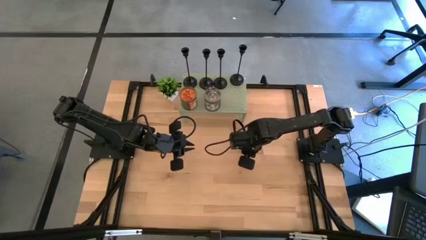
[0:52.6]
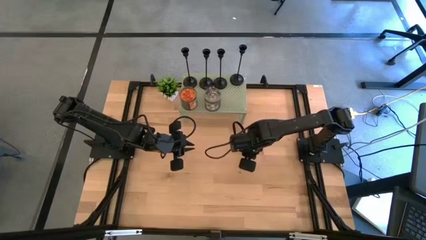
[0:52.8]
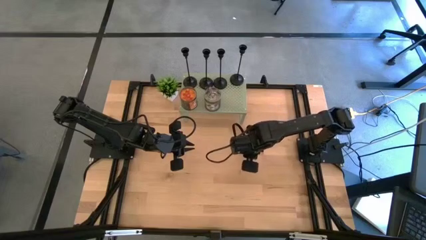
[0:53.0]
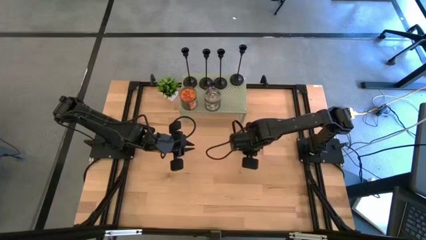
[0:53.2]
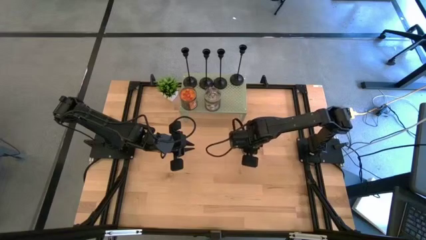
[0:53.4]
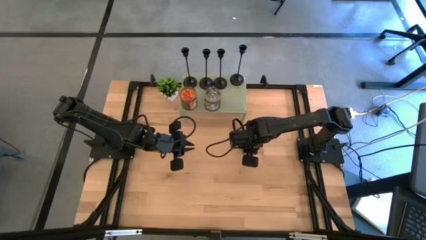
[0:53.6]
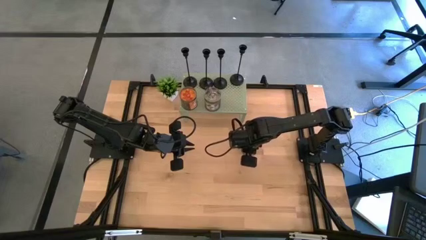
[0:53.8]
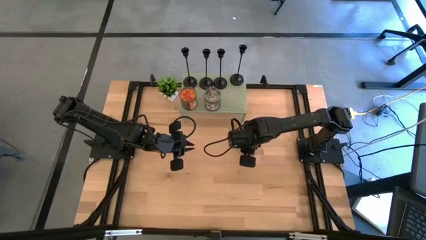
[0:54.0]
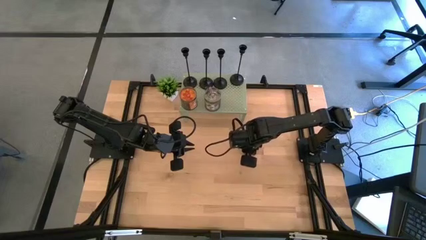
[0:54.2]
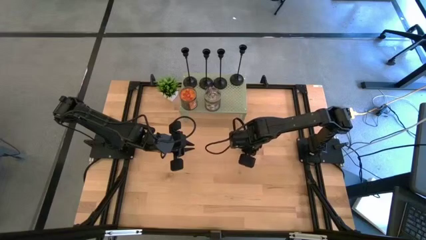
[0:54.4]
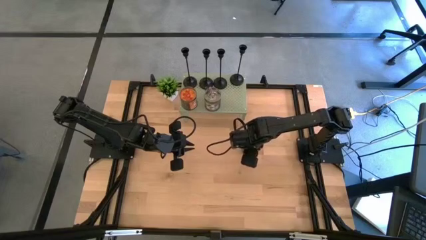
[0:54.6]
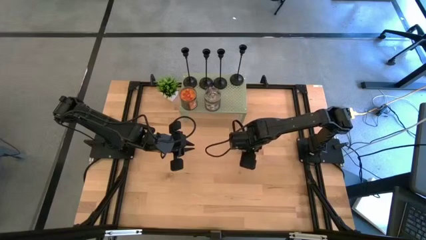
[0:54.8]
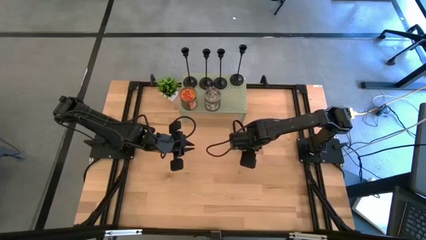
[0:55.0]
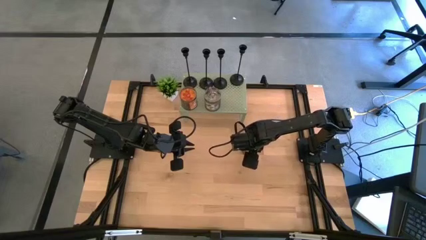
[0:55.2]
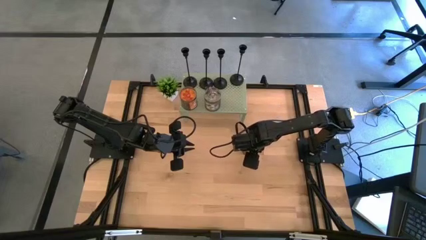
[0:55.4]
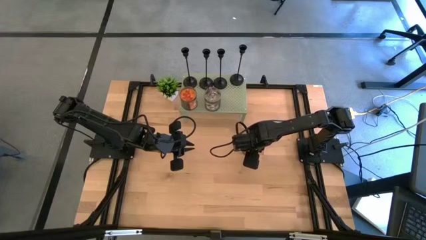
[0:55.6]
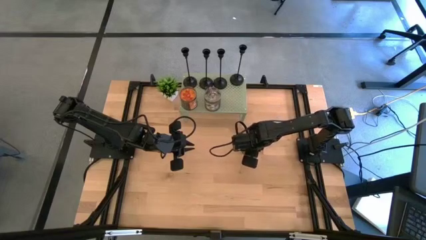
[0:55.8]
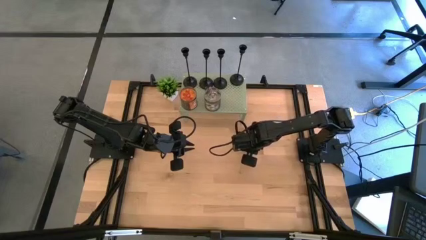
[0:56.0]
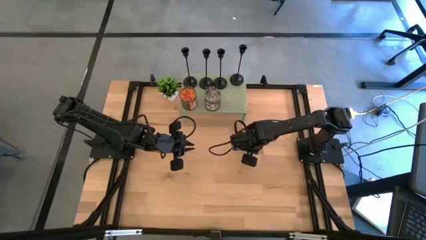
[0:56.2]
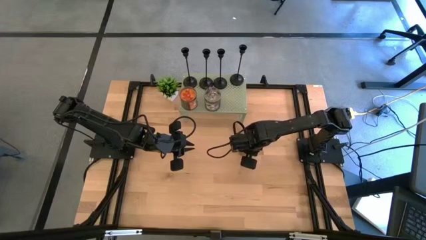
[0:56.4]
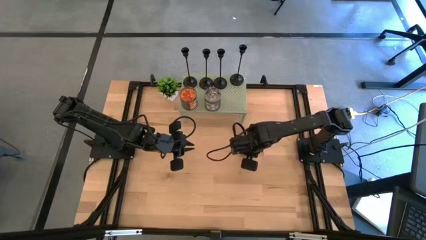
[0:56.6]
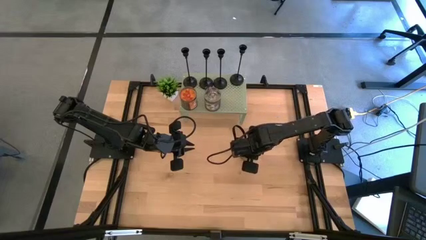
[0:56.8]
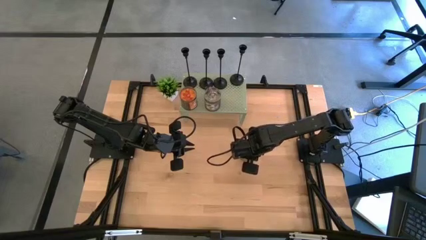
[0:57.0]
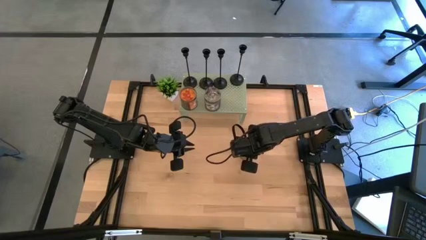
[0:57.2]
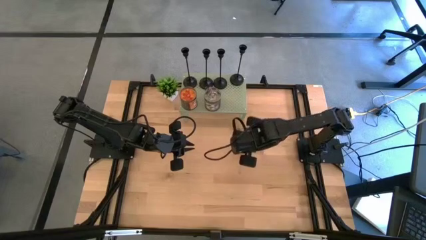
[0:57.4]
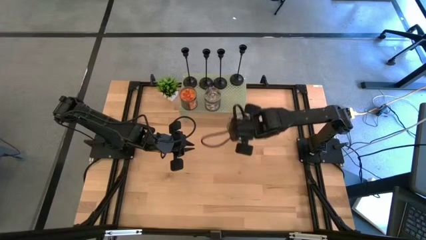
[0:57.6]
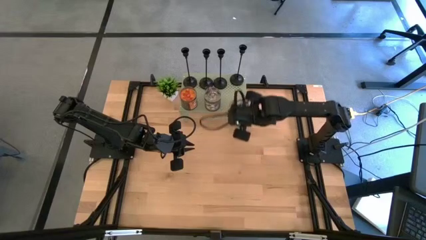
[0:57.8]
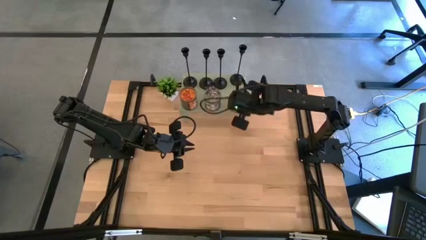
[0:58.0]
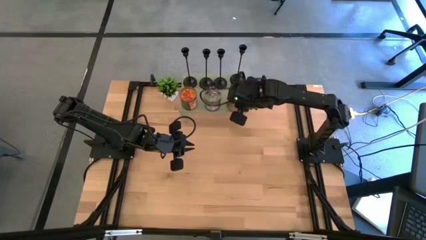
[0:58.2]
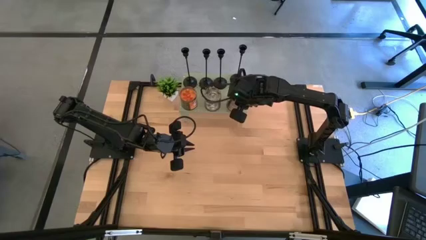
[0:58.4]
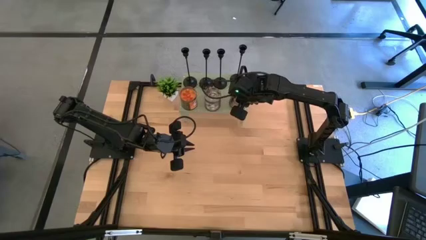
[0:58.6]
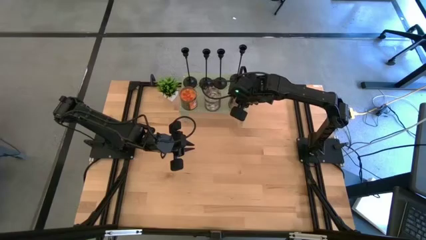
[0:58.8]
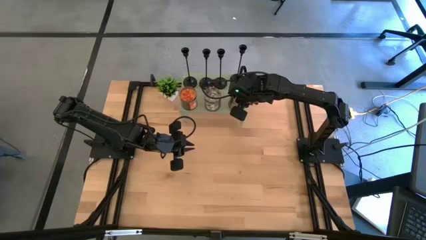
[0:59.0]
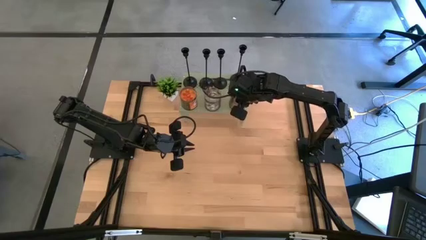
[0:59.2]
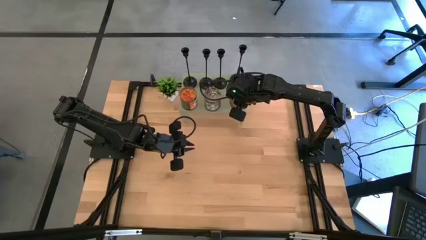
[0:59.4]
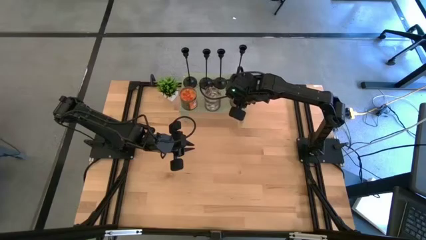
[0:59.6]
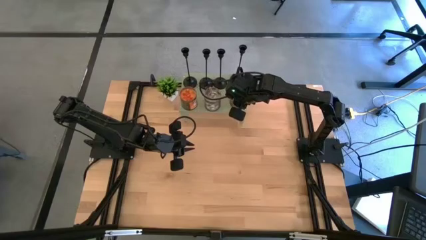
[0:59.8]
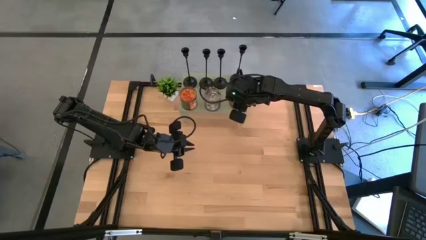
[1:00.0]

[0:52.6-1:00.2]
Task: Pick & Place candle stick holders
Put the brown scented candle on the shelf aligned with the other brown scented candle

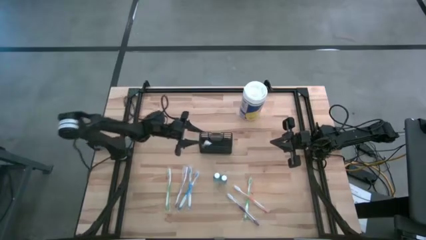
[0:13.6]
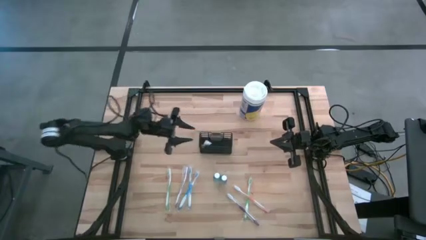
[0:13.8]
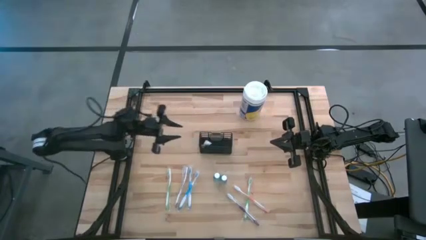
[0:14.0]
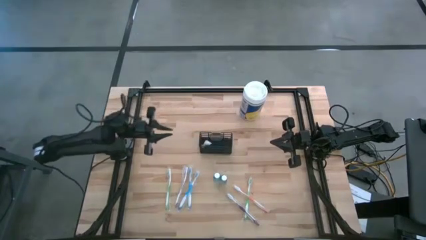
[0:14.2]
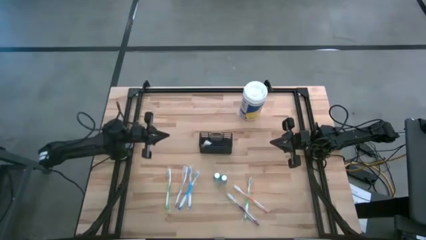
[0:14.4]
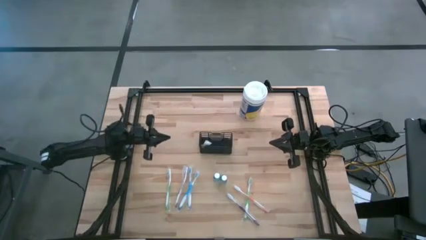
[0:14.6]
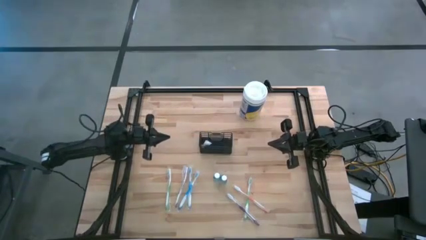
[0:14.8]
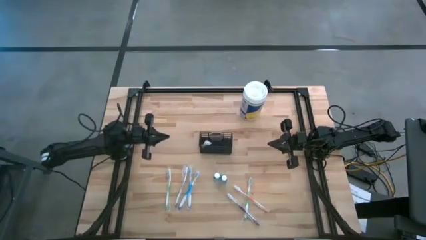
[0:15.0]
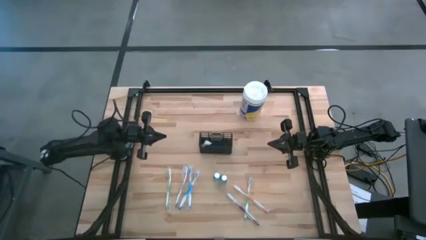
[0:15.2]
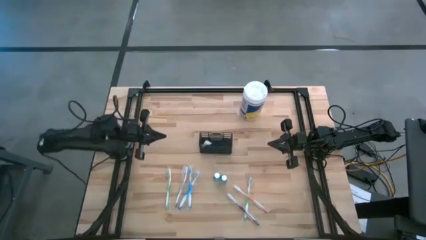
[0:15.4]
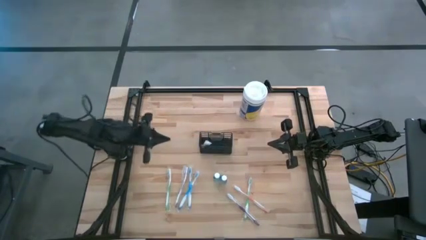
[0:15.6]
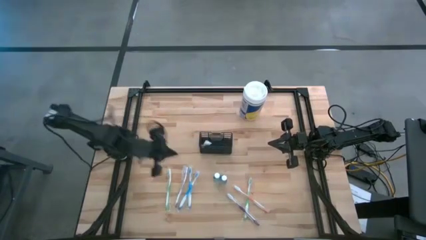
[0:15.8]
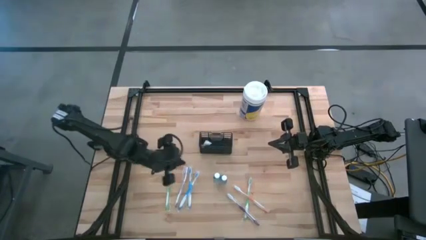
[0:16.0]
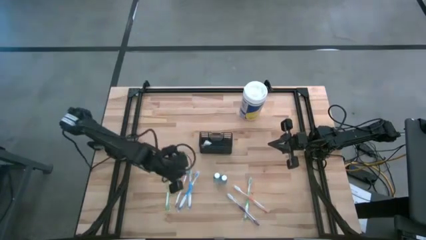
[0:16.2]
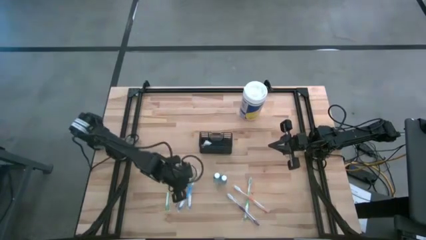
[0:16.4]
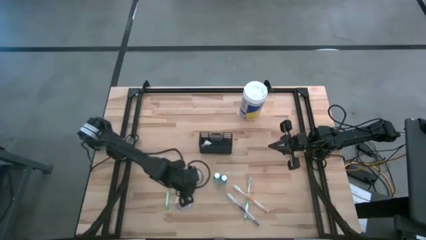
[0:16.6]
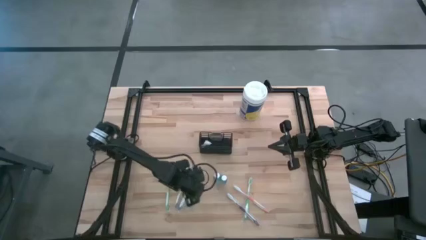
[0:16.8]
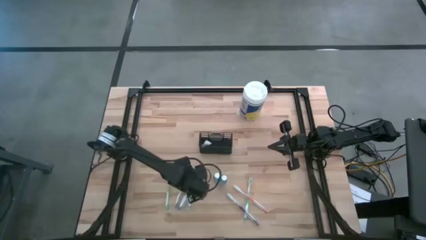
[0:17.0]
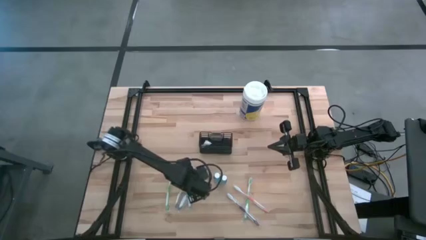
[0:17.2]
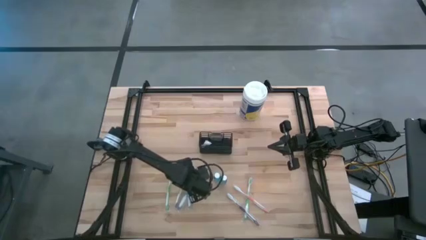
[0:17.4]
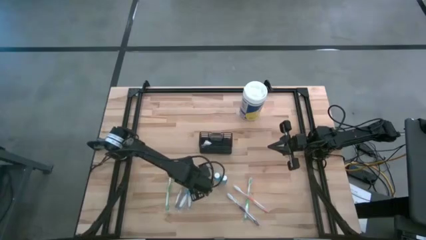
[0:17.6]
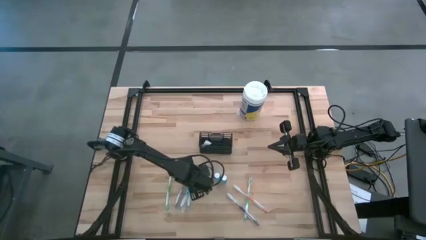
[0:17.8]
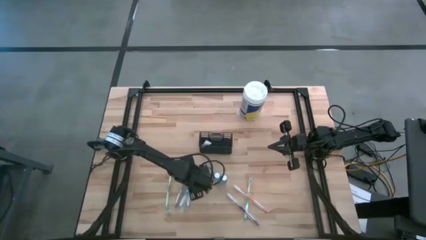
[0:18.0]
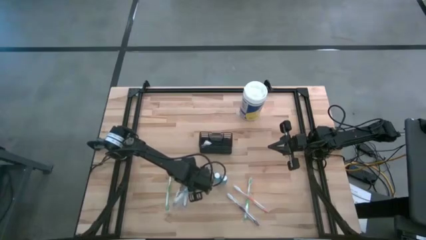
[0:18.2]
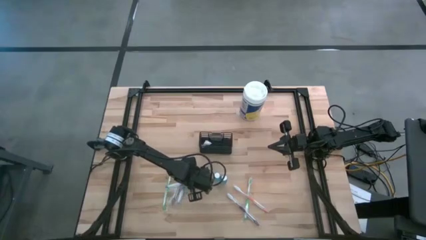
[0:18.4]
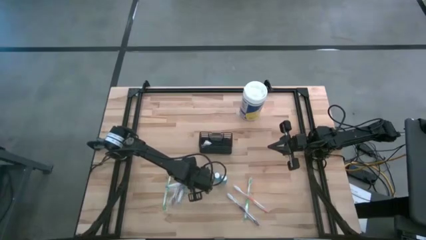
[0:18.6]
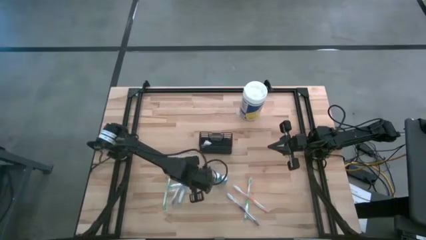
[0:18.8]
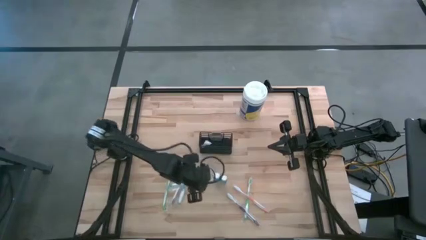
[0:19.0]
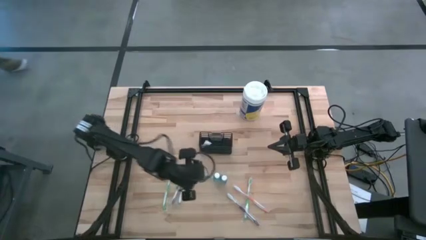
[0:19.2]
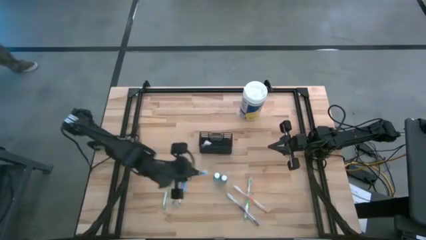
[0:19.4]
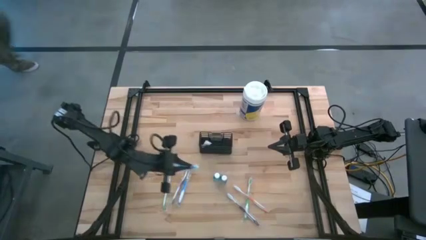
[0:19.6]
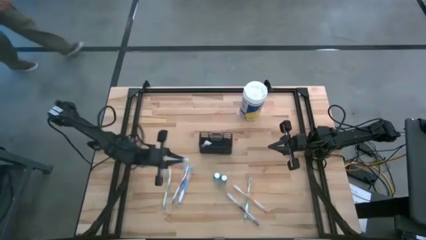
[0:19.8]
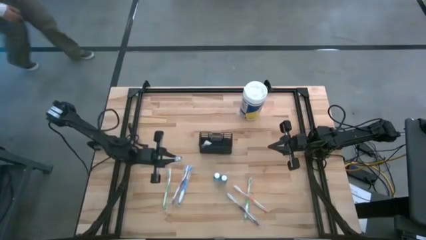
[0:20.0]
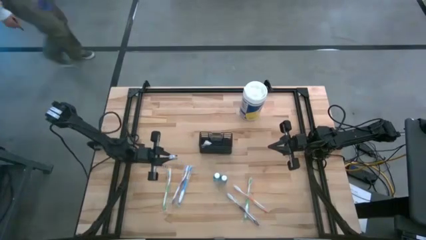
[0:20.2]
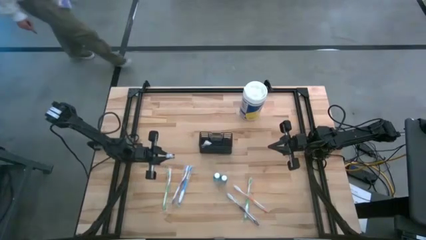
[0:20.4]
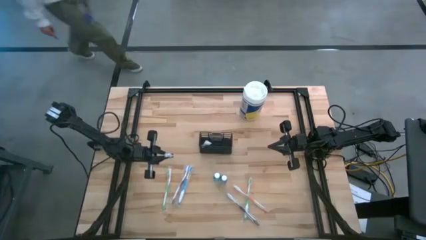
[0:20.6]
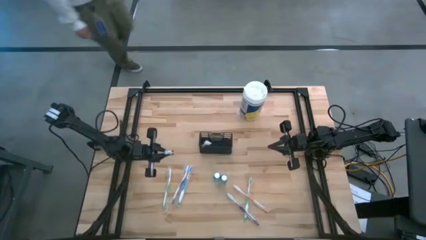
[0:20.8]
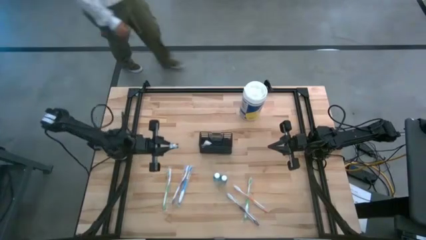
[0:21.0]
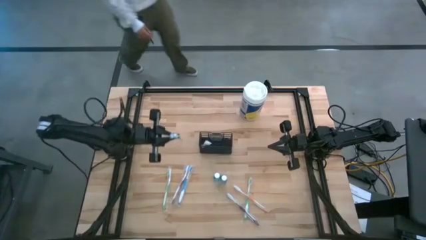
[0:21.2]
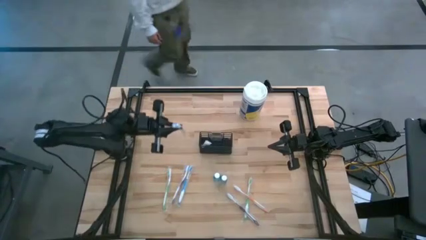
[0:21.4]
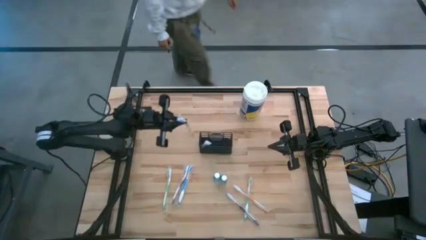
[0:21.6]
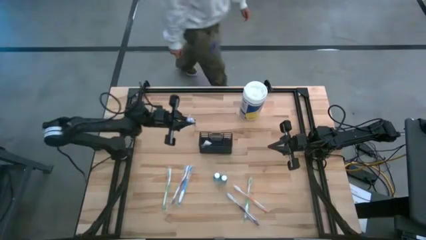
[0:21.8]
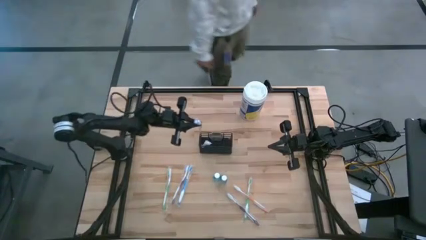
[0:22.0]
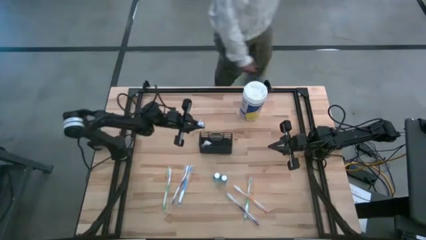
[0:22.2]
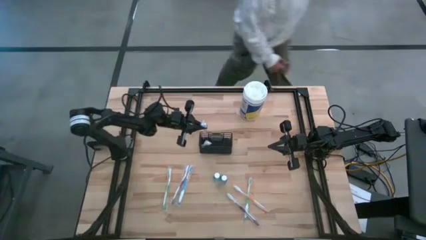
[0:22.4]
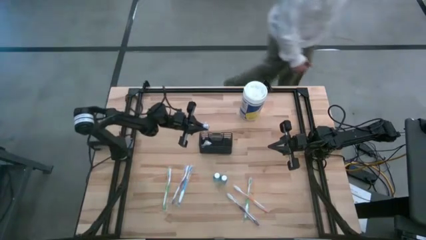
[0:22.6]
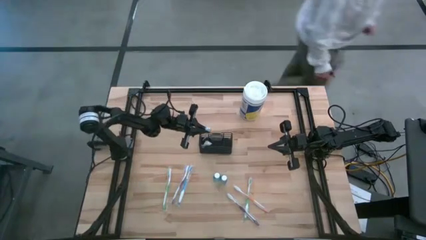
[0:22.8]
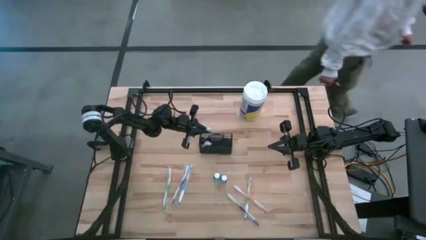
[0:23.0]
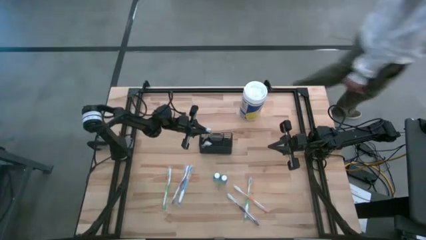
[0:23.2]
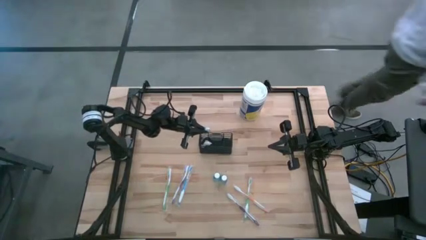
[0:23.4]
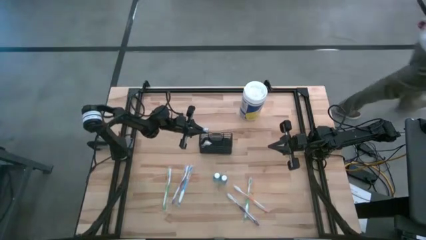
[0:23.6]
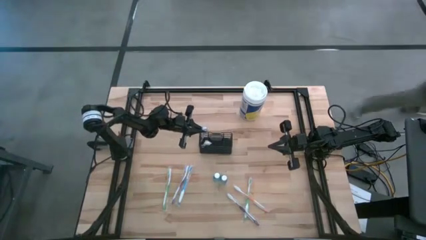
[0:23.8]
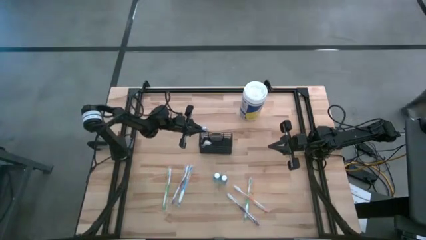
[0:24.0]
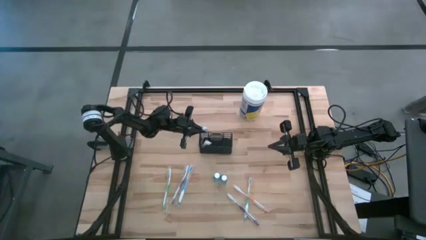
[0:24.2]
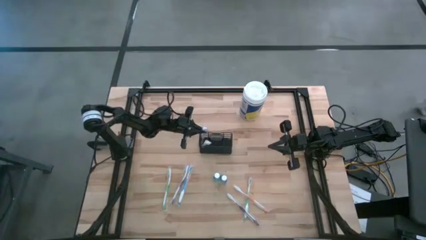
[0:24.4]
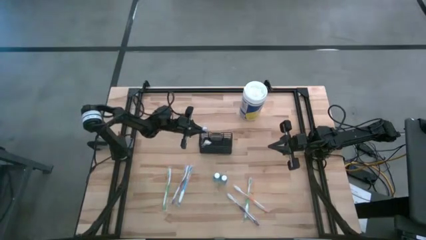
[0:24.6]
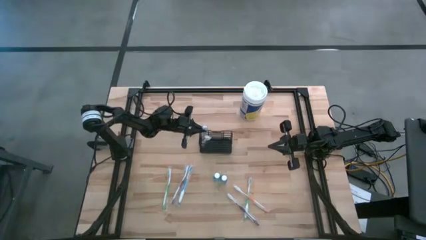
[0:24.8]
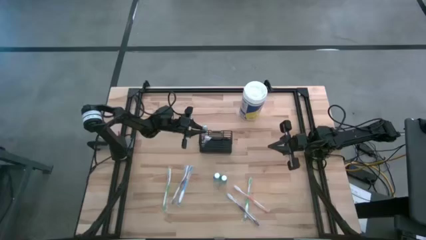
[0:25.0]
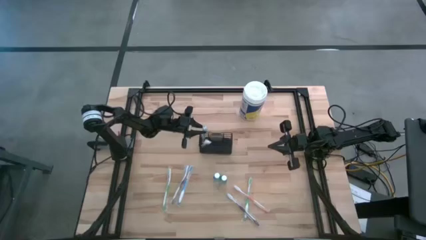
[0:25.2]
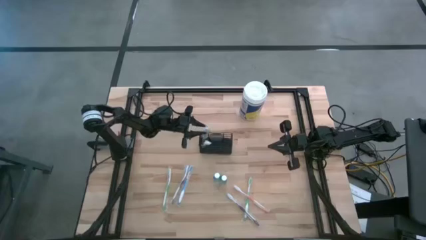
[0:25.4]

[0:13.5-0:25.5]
Task: Pick & Place toothbrushing station
Put the blue toothbrush into the black wire organizer
